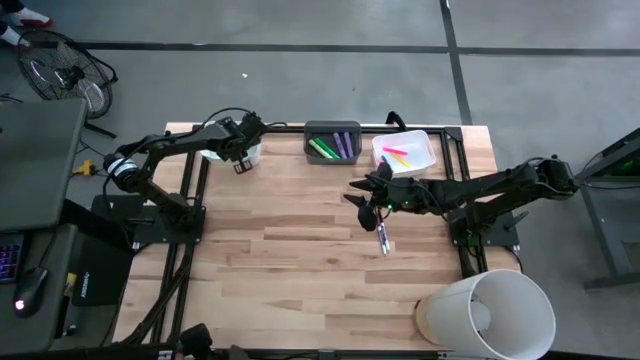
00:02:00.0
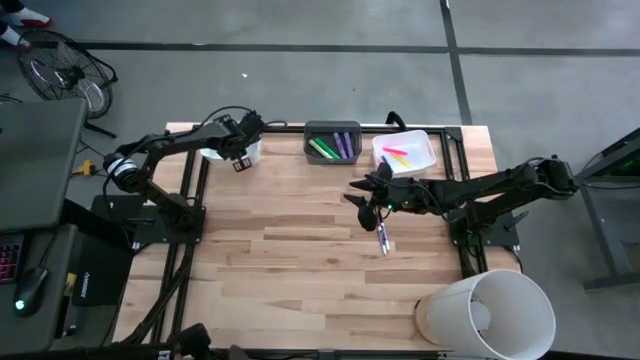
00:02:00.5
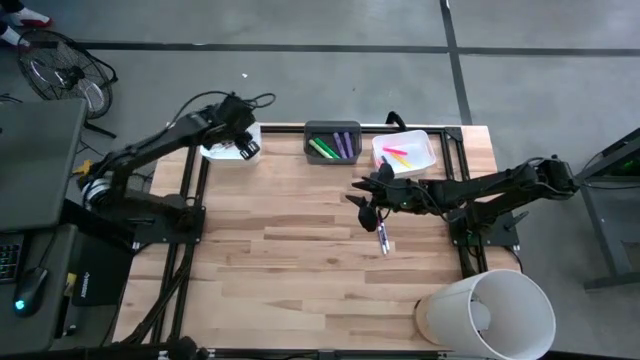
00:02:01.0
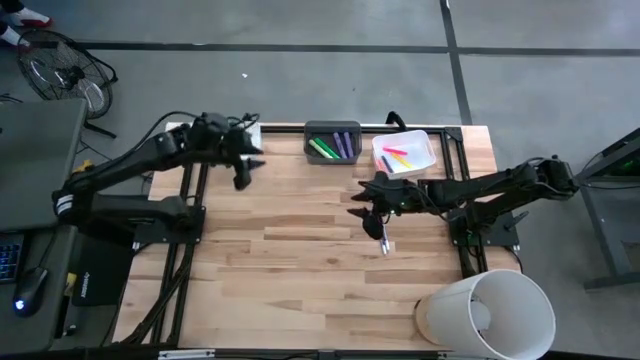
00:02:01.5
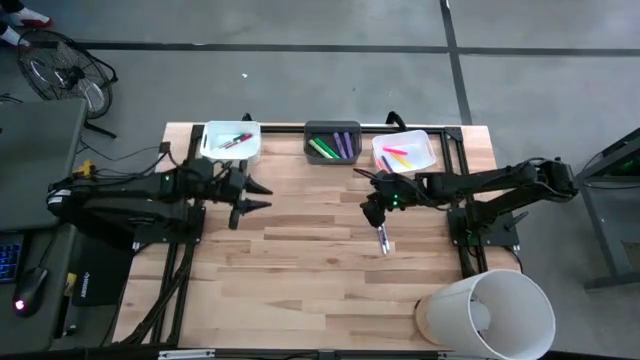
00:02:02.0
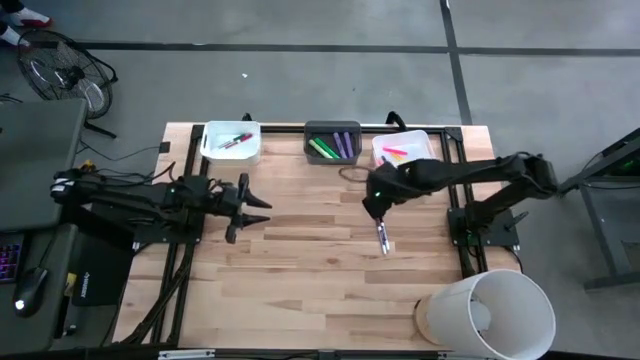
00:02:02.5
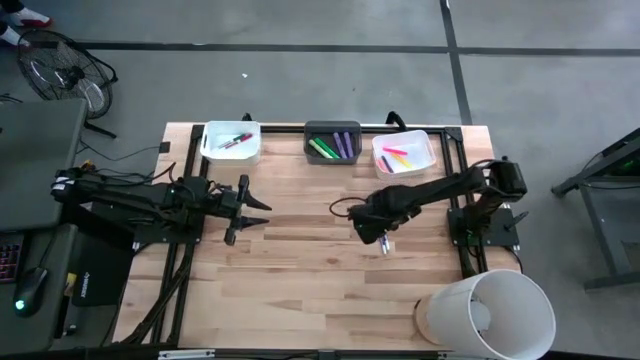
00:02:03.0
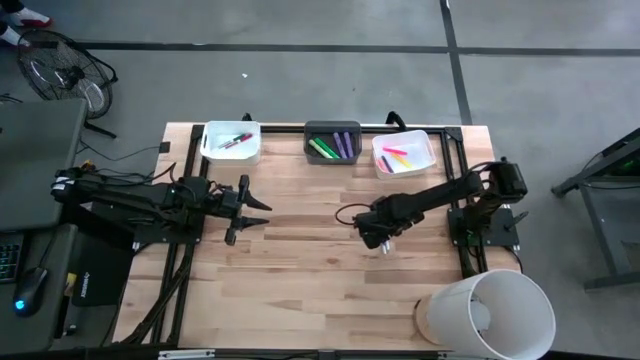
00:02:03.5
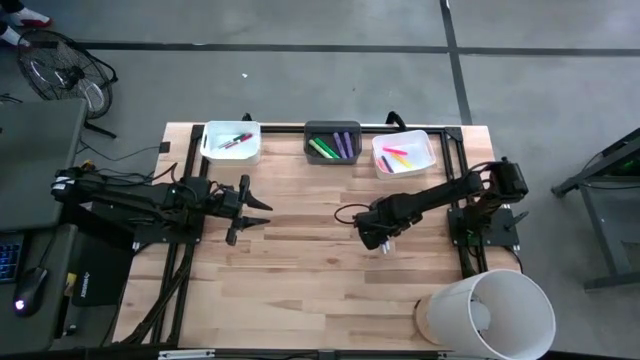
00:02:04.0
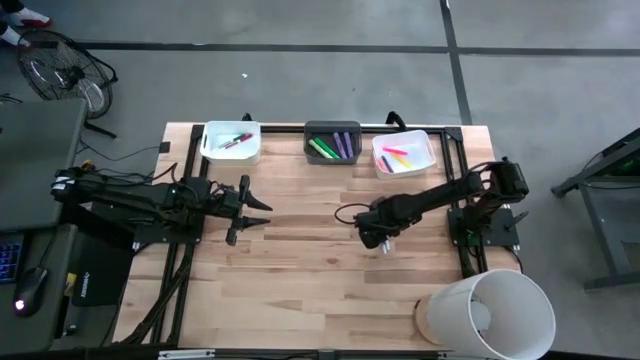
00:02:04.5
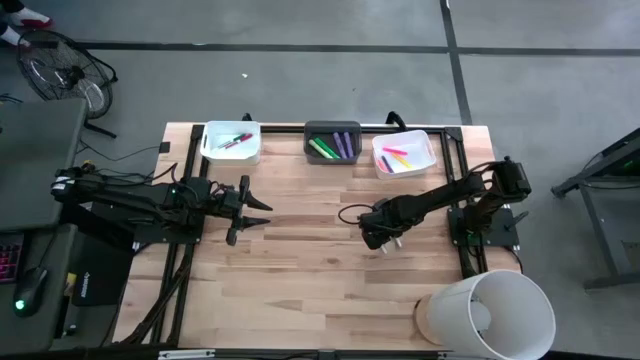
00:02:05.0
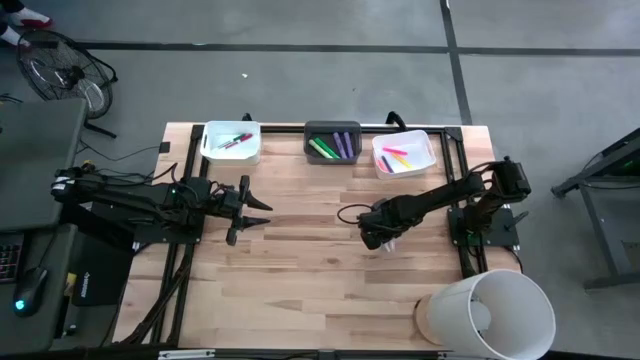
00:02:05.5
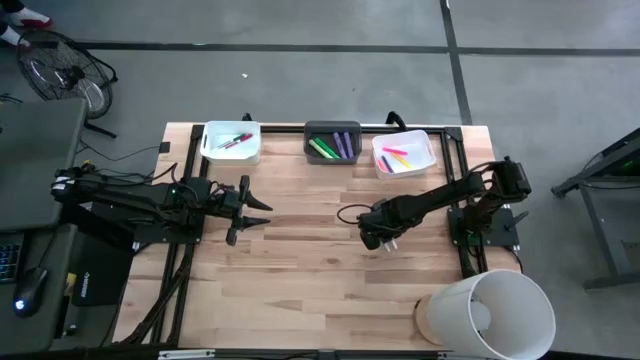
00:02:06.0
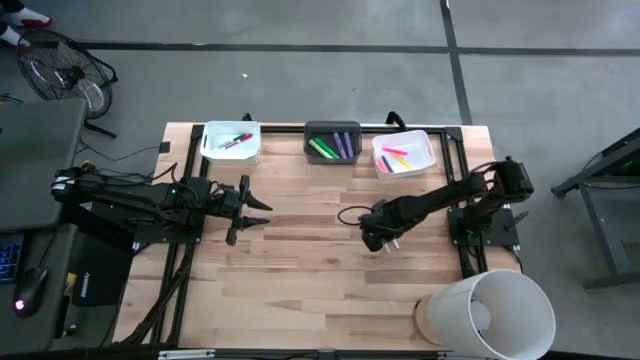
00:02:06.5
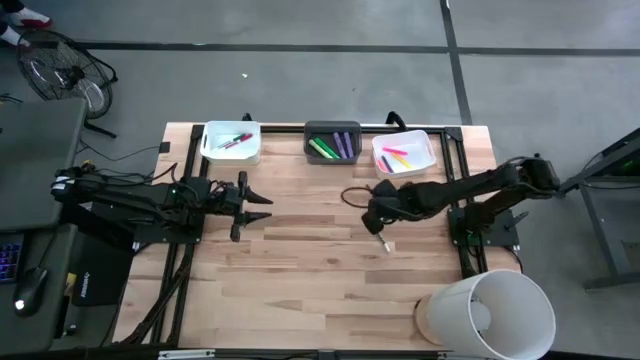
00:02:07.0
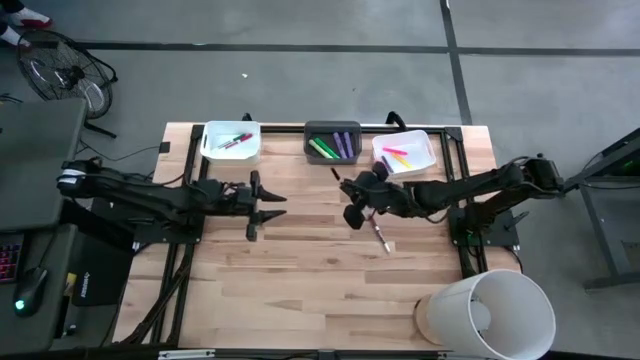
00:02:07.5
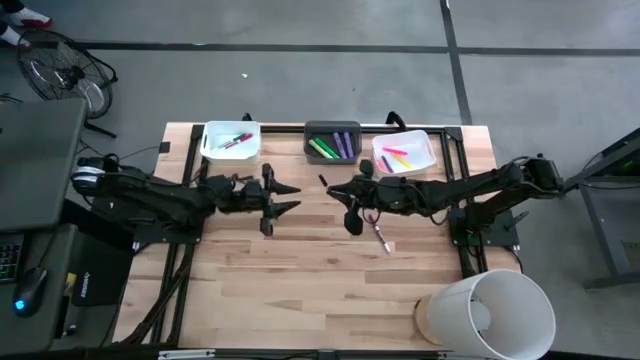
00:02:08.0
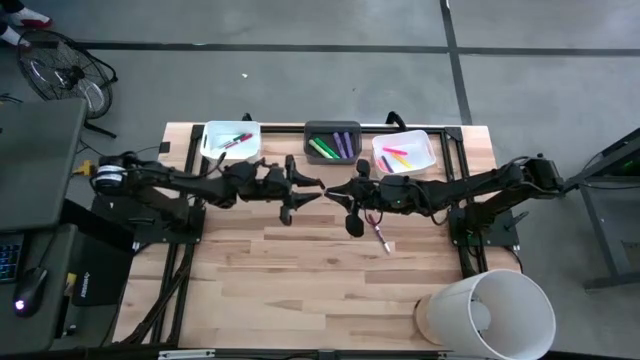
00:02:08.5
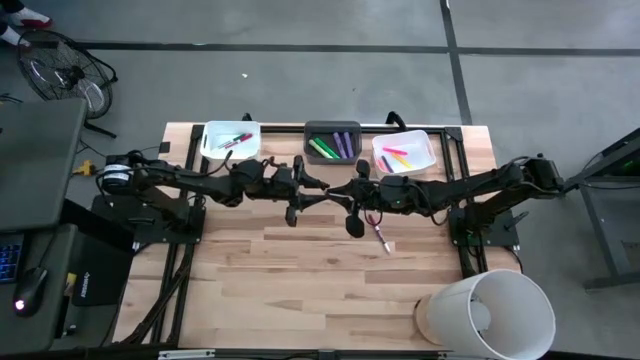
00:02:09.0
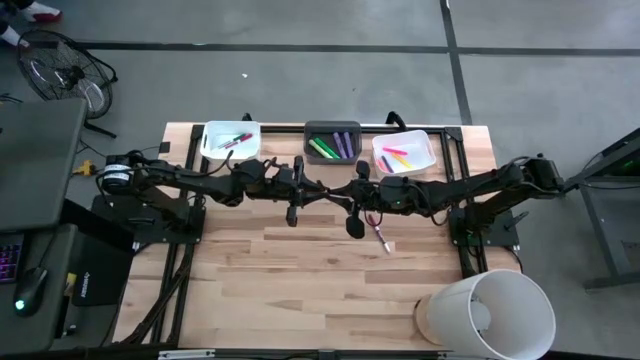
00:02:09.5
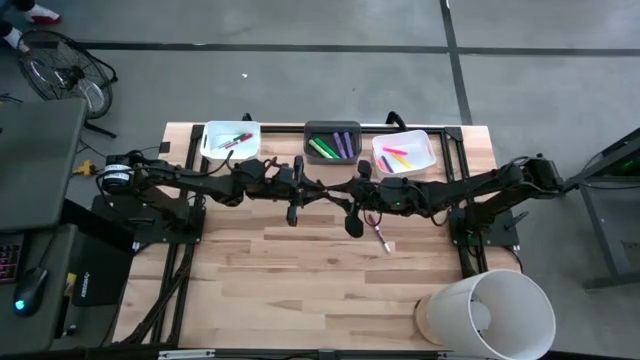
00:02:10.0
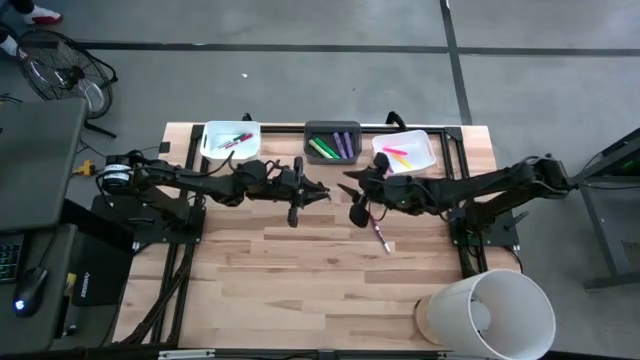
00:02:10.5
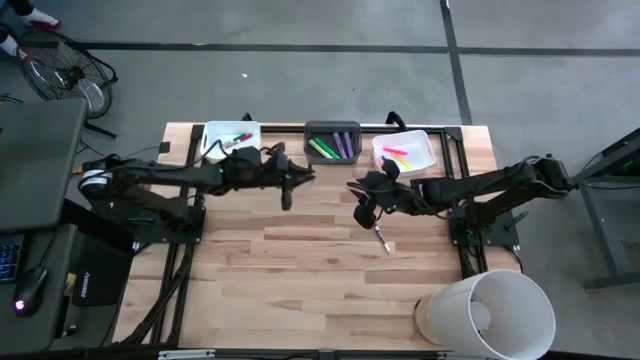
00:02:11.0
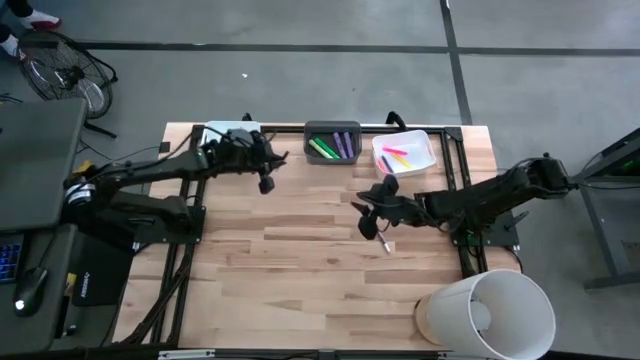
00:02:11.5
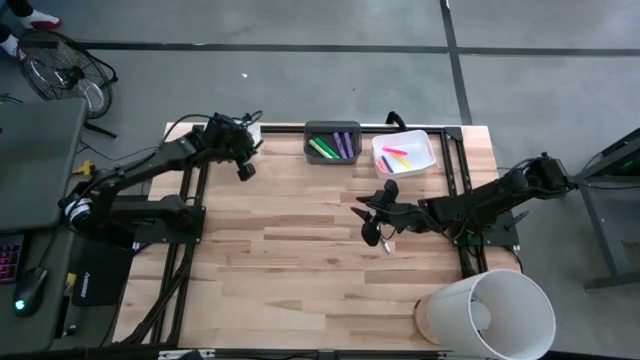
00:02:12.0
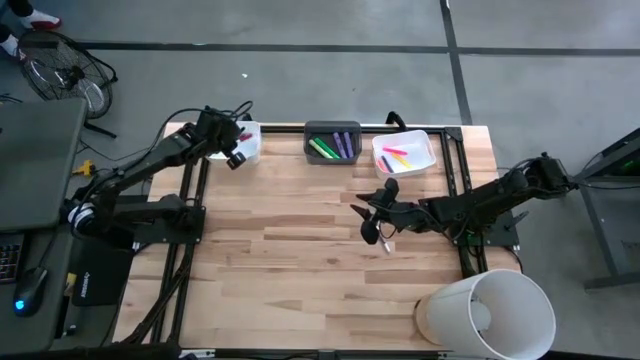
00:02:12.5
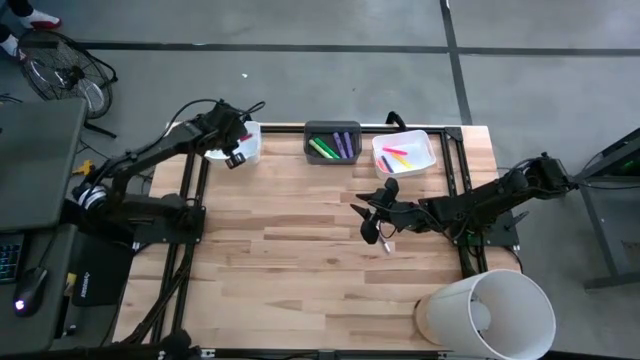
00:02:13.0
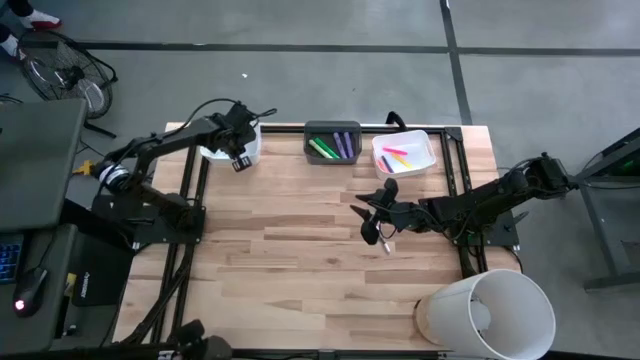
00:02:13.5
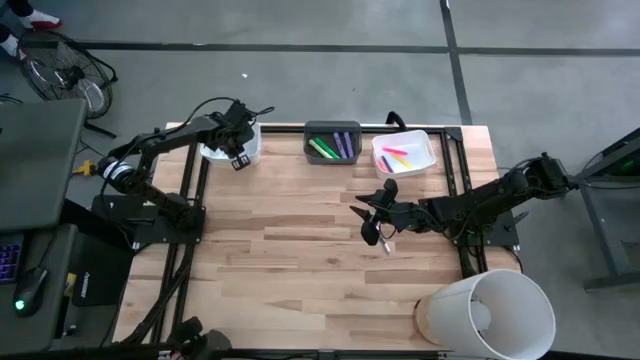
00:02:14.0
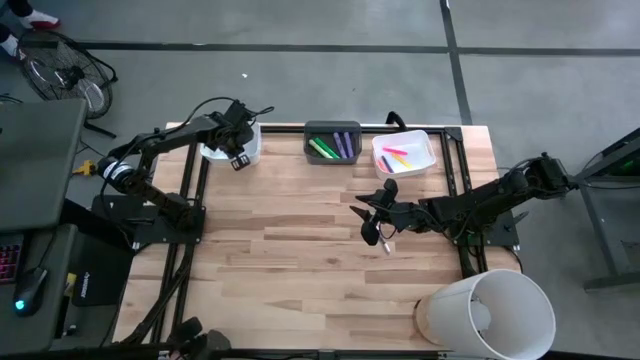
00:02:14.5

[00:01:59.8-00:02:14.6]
Task: Pick & Place Markers
Put the black highlighter pen into the left white bin

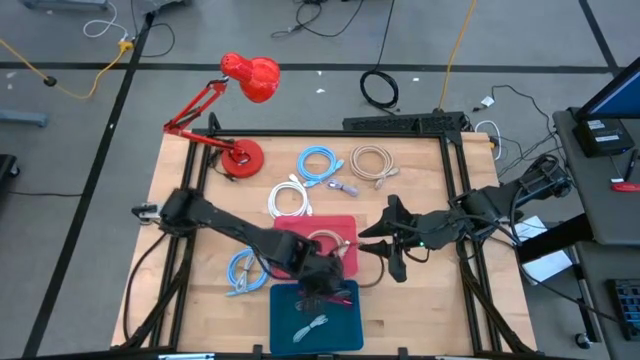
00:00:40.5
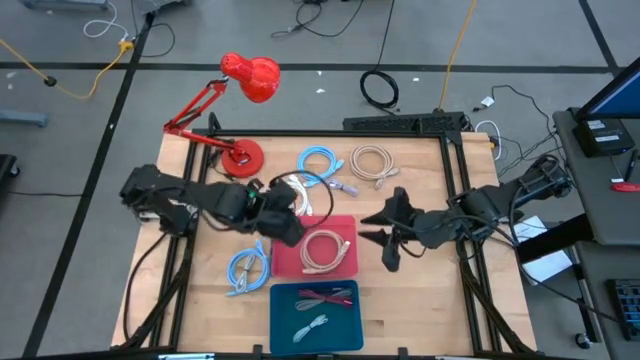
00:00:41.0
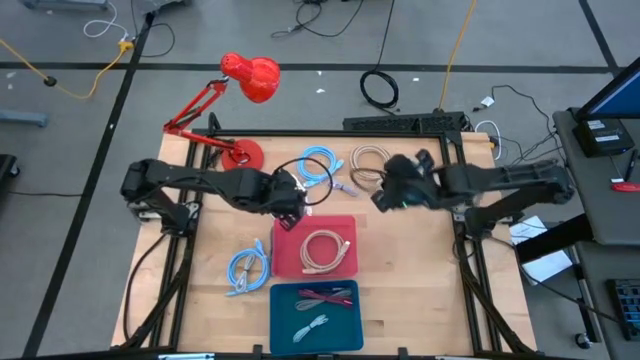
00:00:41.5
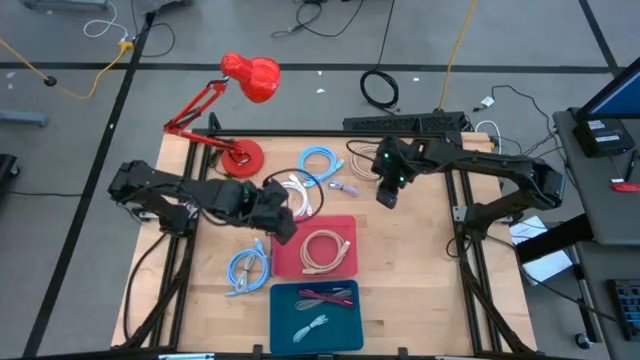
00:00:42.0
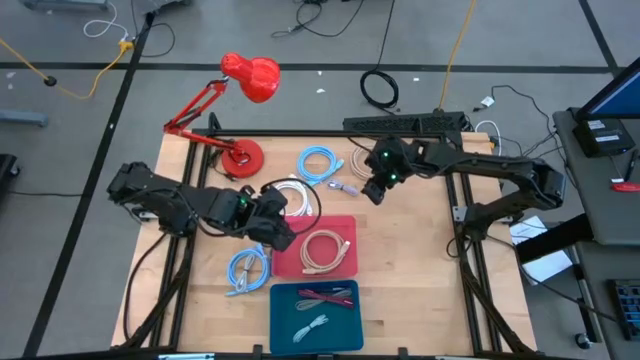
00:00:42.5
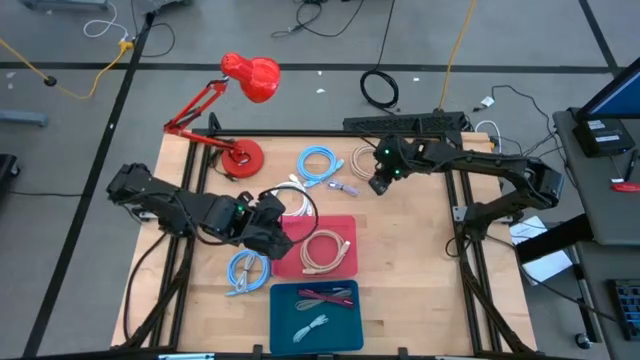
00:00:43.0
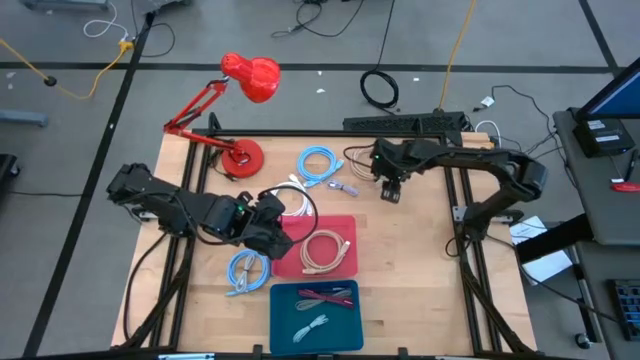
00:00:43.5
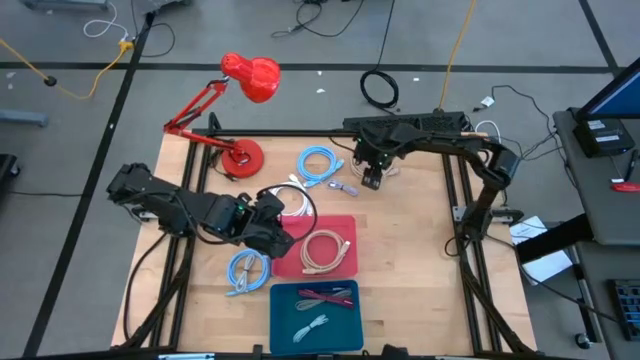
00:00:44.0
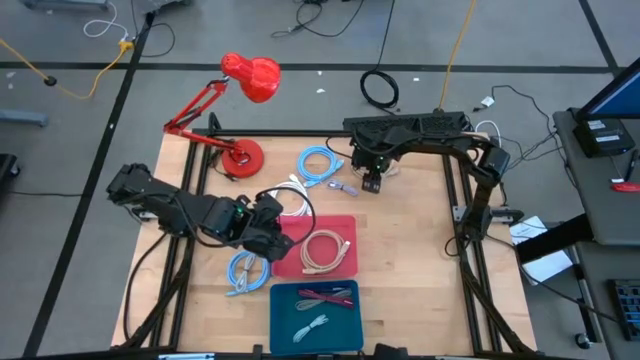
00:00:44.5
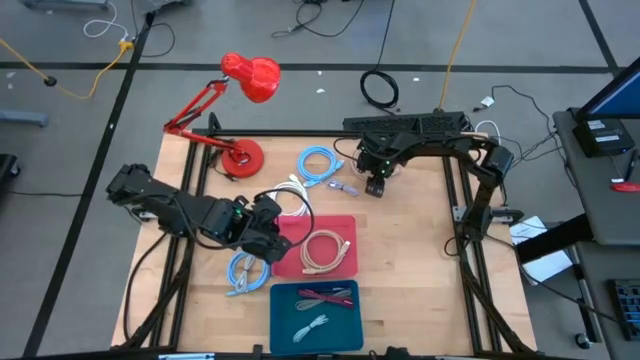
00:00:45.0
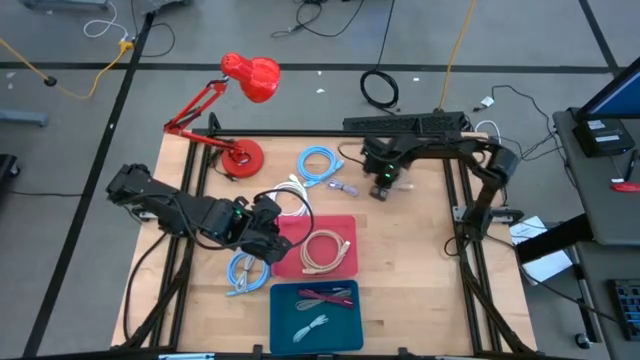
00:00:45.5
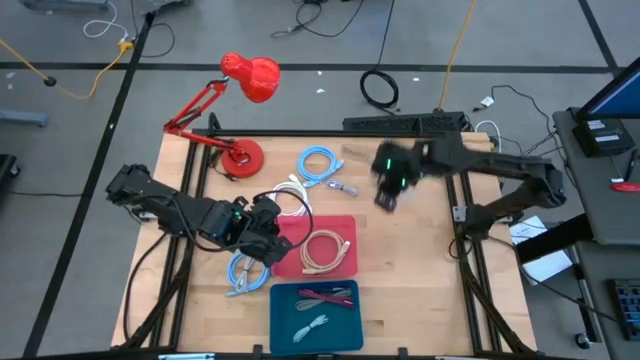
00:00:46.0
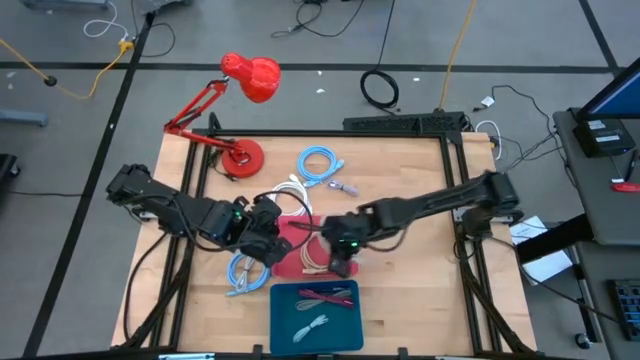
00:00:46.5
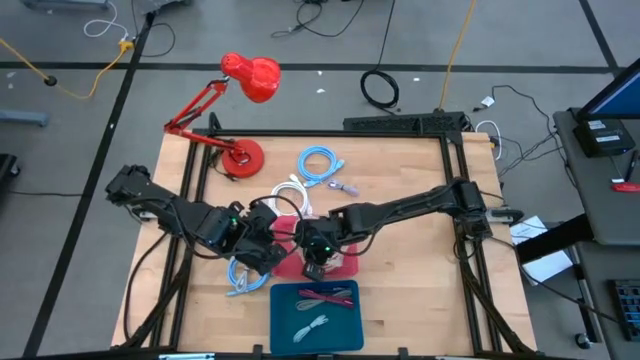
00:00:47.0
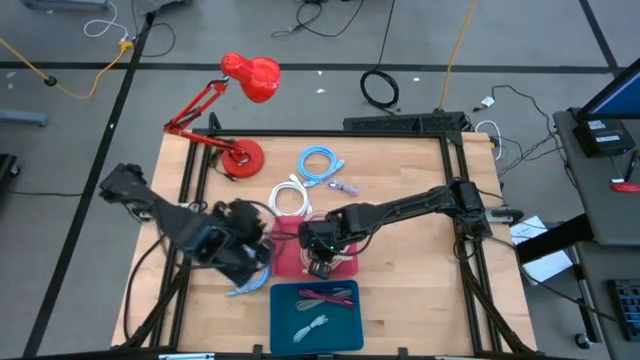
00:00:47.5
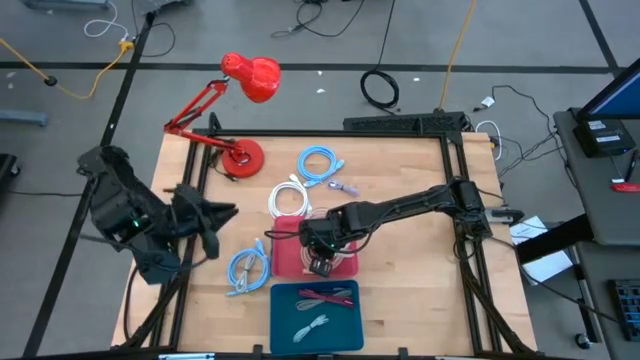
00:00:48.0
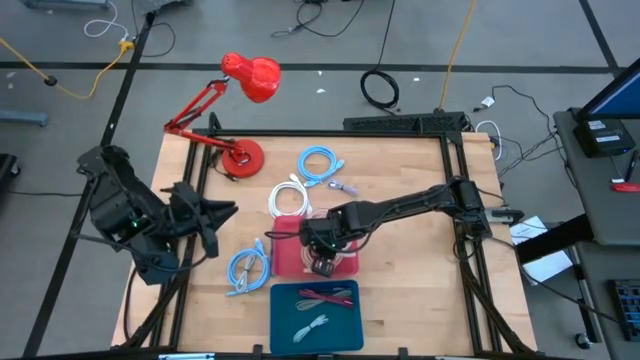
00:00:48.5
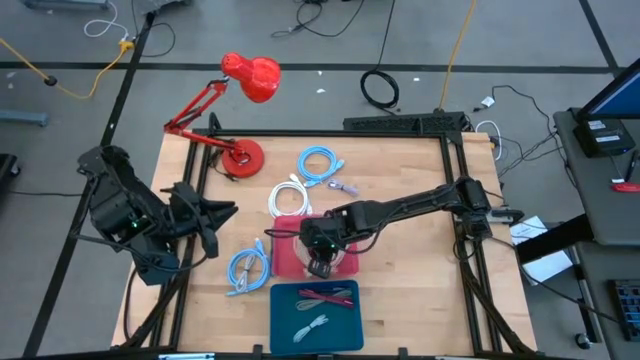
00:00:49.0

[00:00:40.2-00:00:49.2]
Task: Pick & Place USB Port
Put the light brown HDMI cable into the red bin
